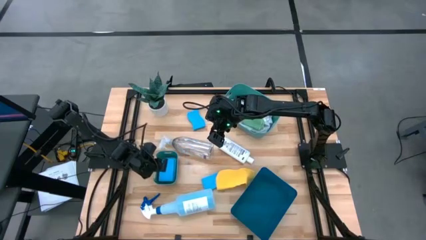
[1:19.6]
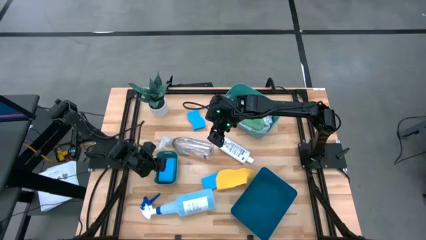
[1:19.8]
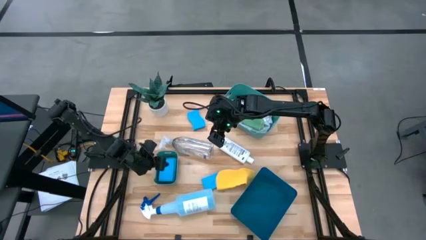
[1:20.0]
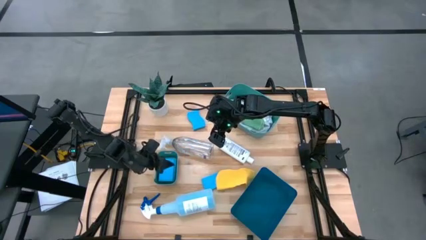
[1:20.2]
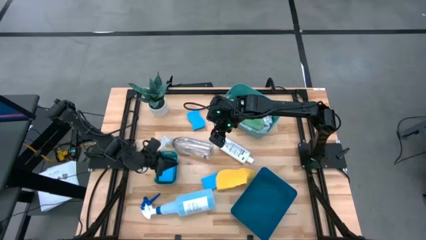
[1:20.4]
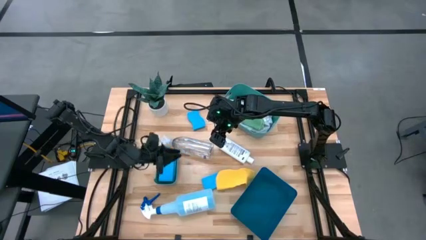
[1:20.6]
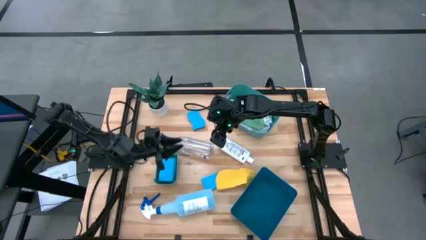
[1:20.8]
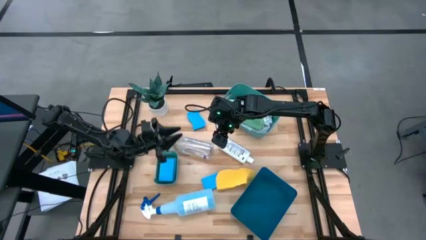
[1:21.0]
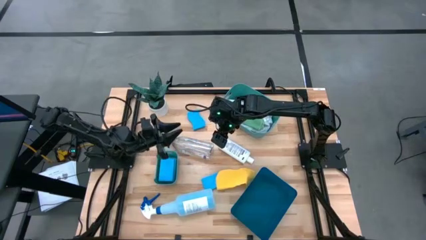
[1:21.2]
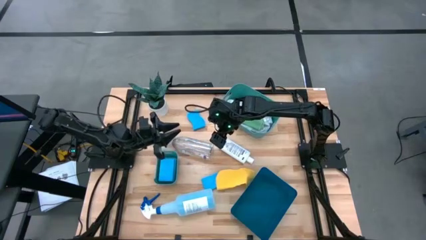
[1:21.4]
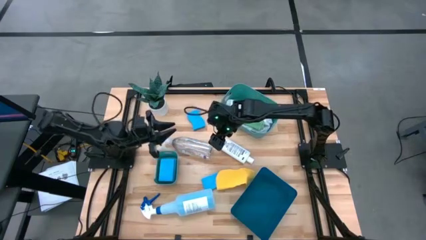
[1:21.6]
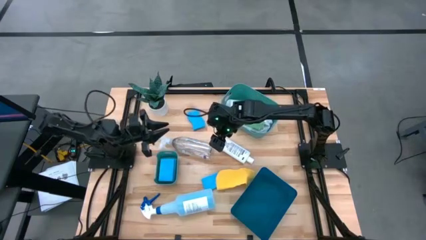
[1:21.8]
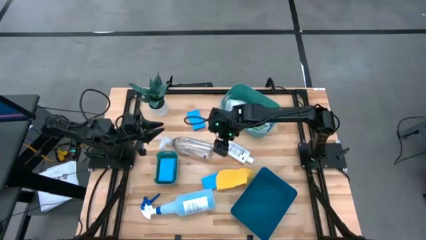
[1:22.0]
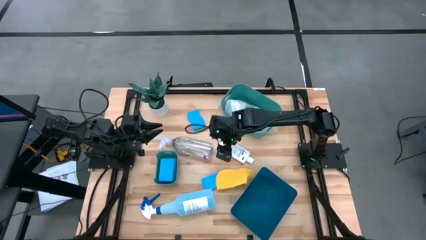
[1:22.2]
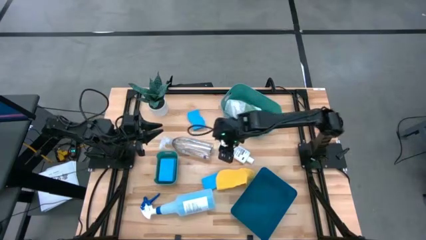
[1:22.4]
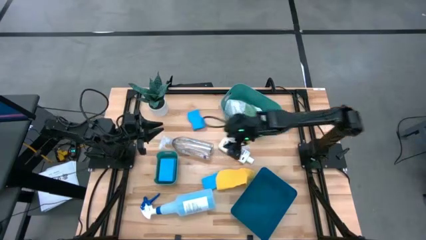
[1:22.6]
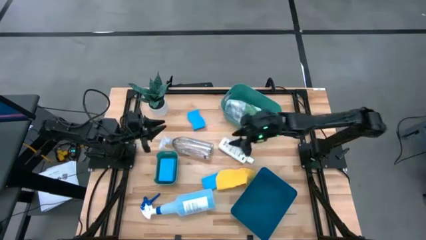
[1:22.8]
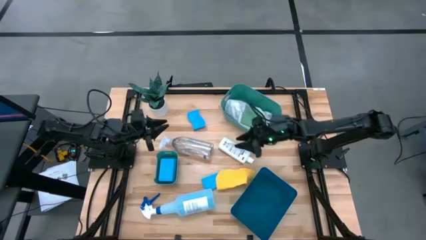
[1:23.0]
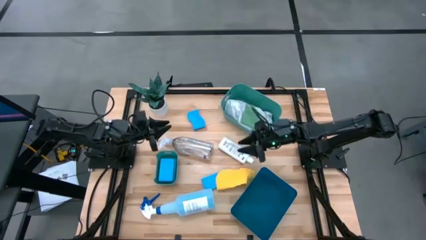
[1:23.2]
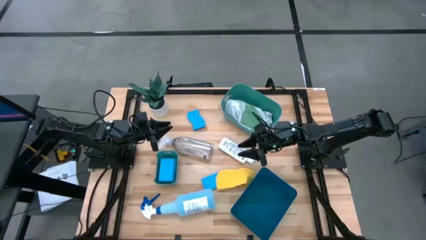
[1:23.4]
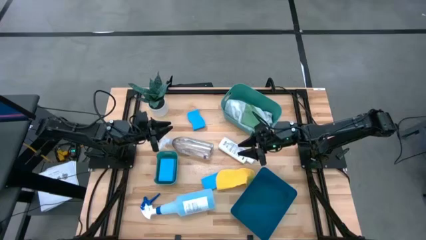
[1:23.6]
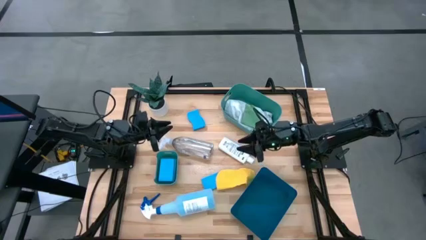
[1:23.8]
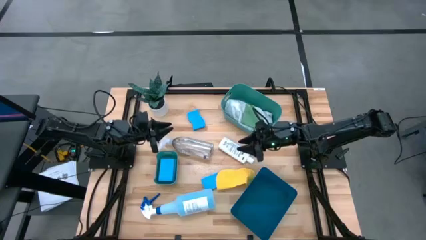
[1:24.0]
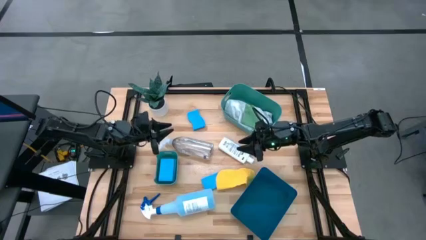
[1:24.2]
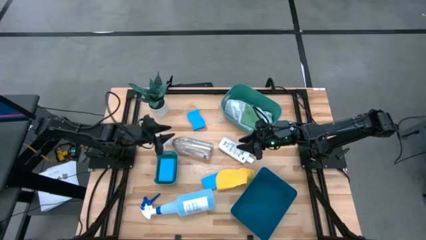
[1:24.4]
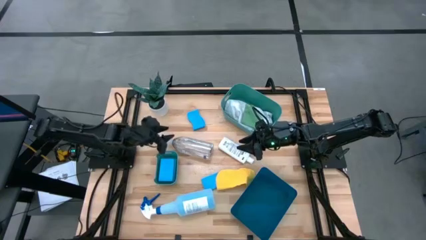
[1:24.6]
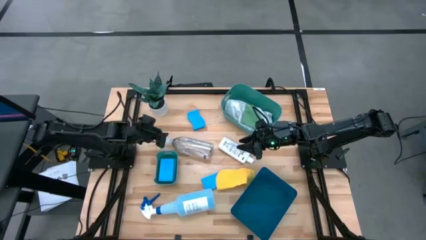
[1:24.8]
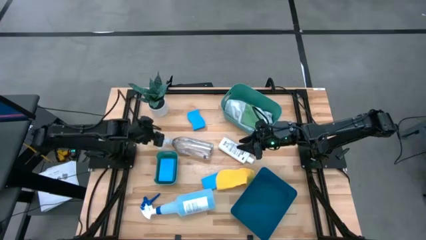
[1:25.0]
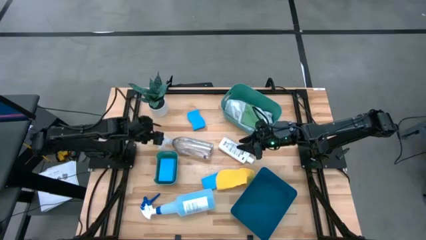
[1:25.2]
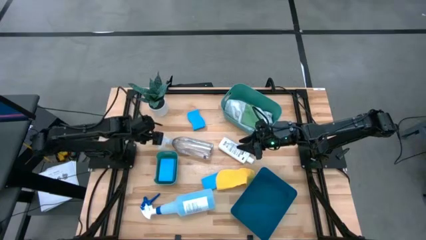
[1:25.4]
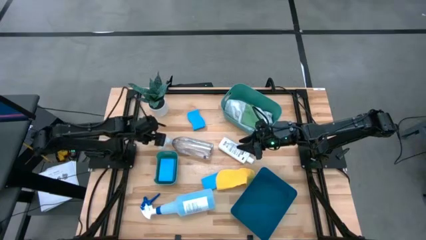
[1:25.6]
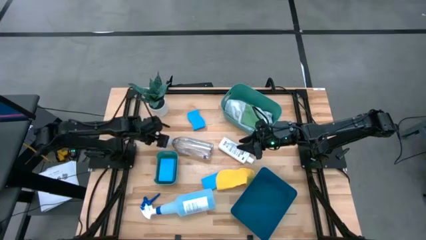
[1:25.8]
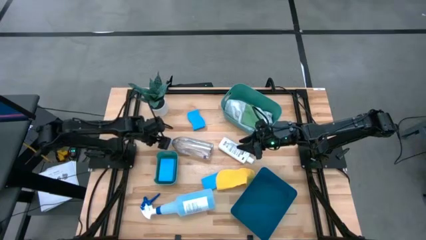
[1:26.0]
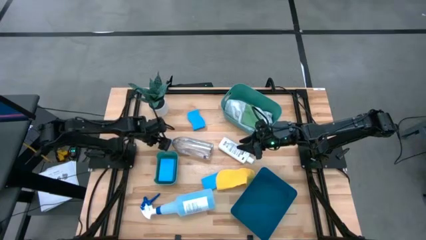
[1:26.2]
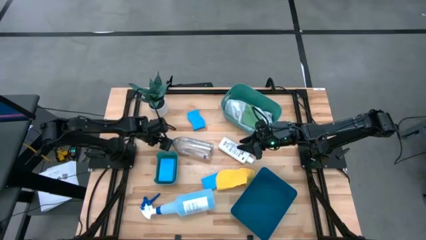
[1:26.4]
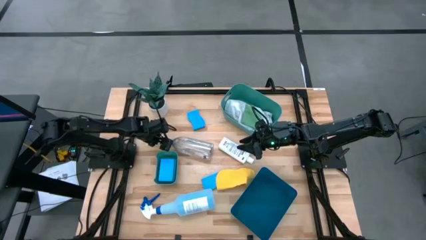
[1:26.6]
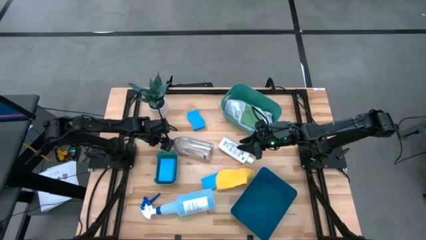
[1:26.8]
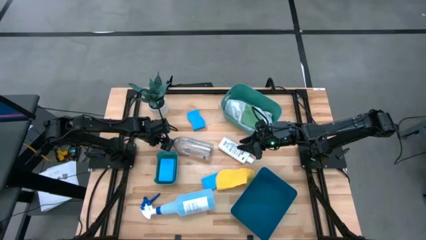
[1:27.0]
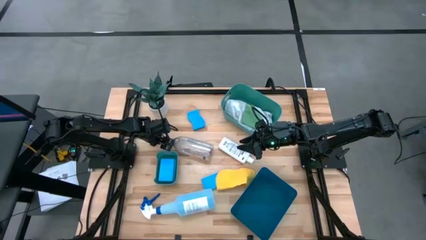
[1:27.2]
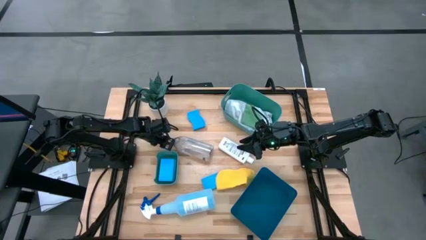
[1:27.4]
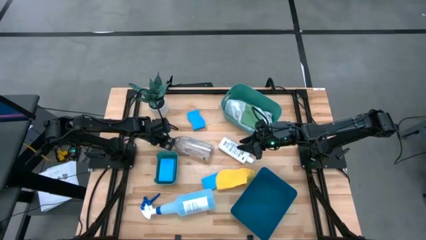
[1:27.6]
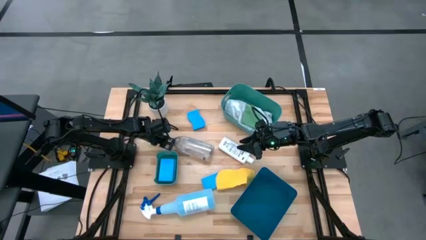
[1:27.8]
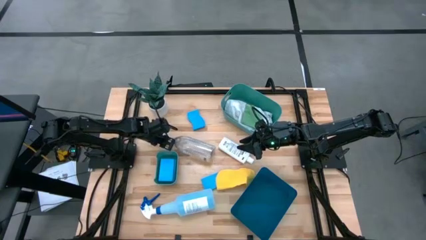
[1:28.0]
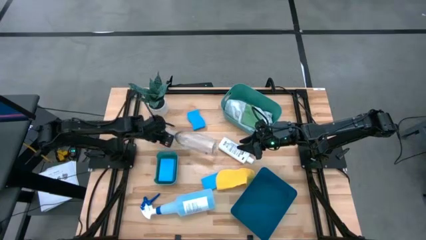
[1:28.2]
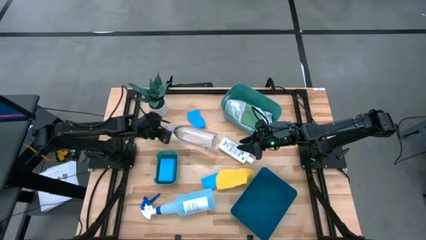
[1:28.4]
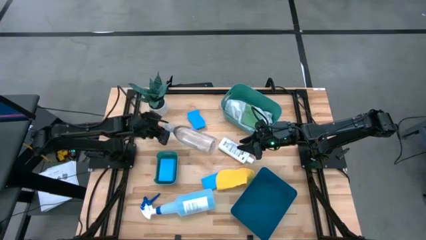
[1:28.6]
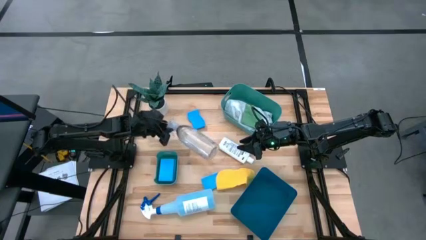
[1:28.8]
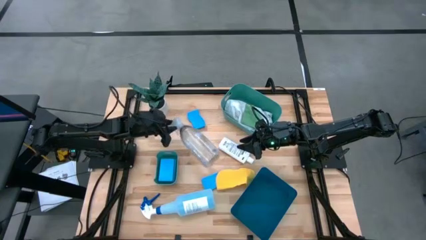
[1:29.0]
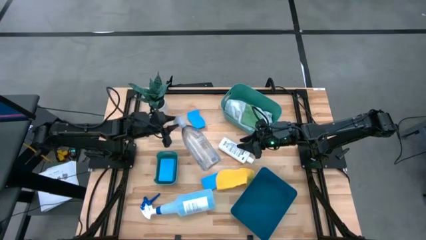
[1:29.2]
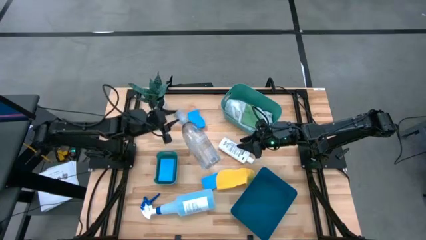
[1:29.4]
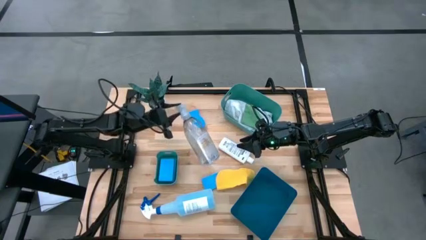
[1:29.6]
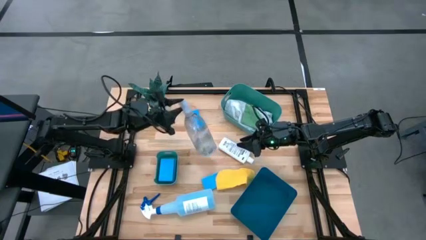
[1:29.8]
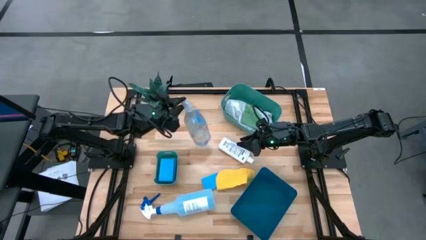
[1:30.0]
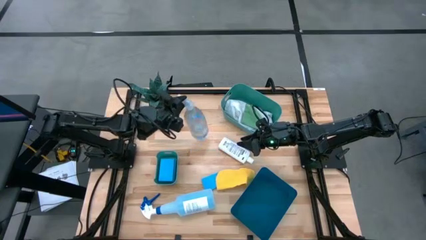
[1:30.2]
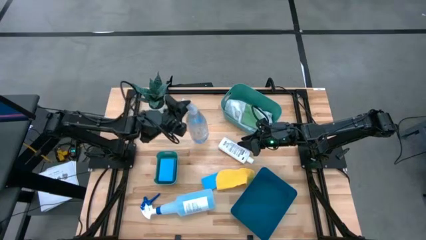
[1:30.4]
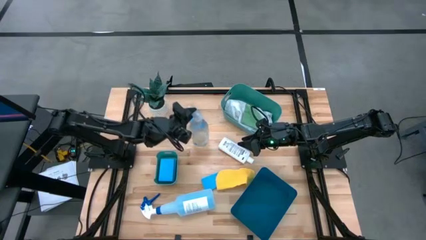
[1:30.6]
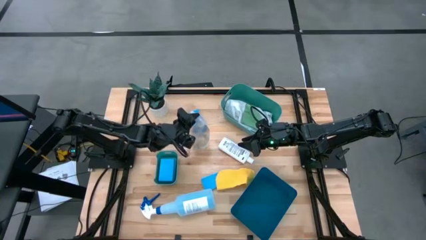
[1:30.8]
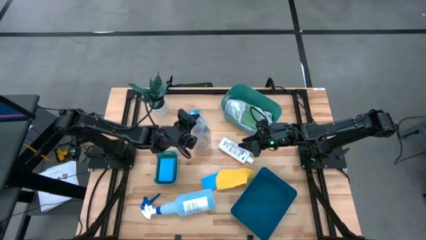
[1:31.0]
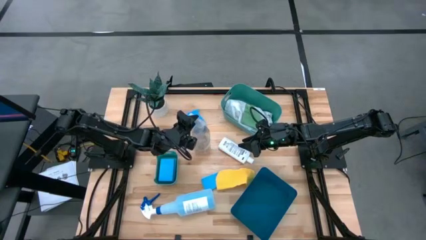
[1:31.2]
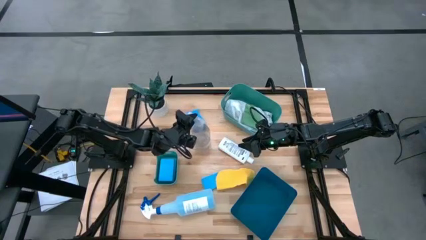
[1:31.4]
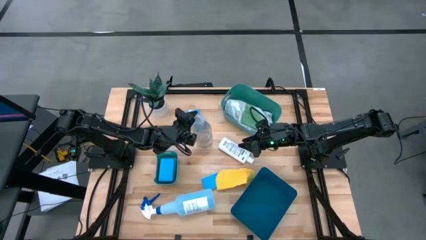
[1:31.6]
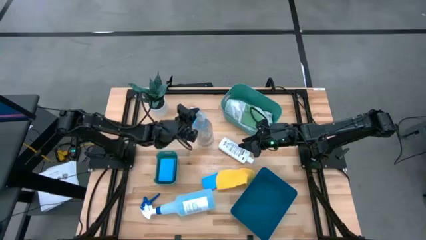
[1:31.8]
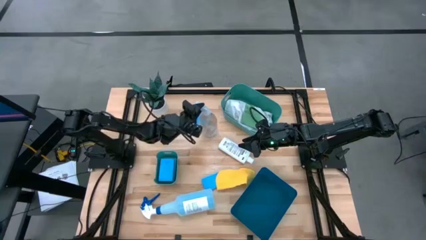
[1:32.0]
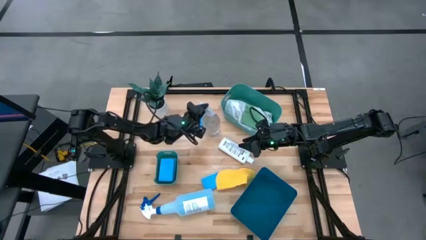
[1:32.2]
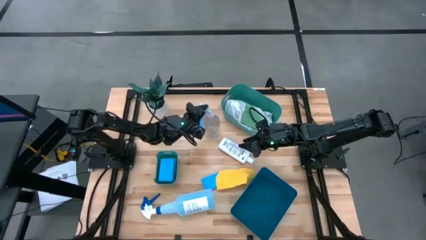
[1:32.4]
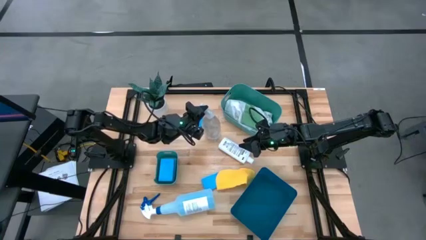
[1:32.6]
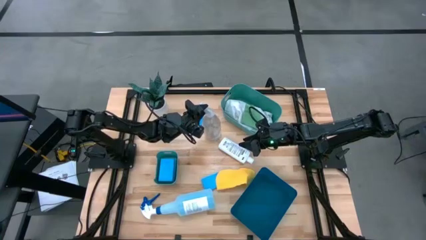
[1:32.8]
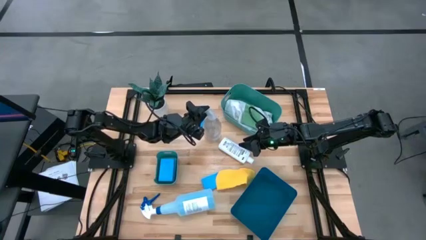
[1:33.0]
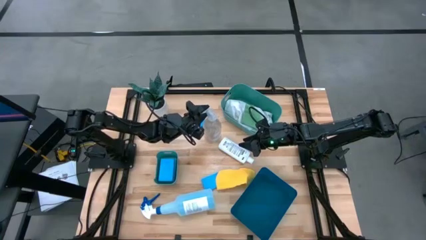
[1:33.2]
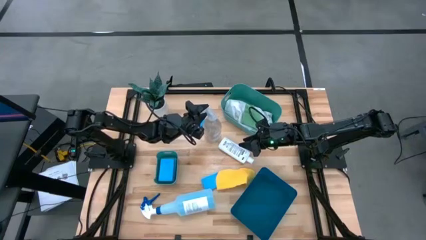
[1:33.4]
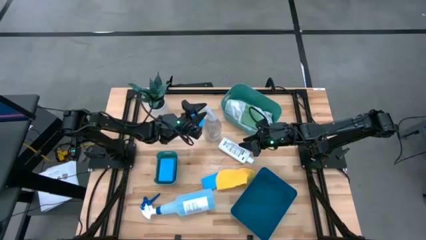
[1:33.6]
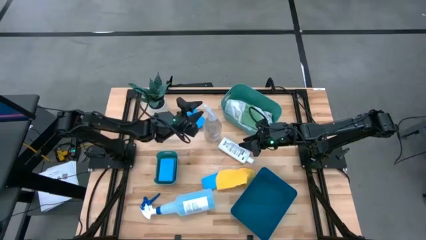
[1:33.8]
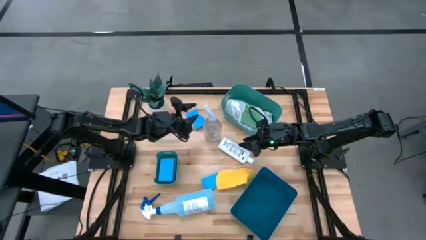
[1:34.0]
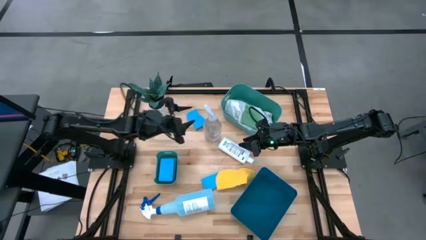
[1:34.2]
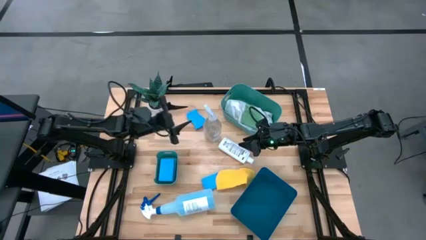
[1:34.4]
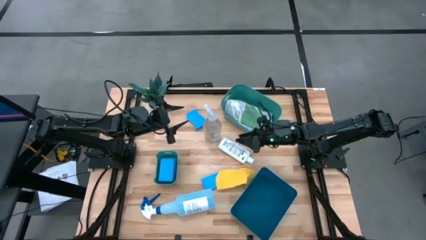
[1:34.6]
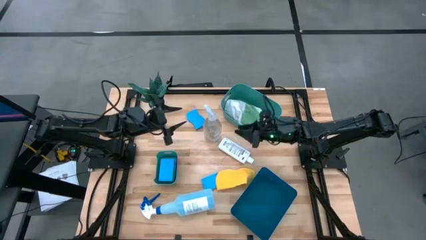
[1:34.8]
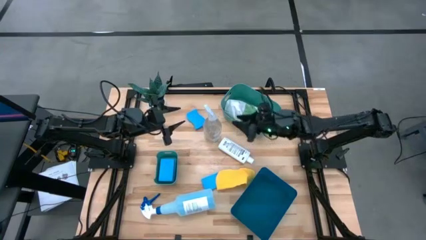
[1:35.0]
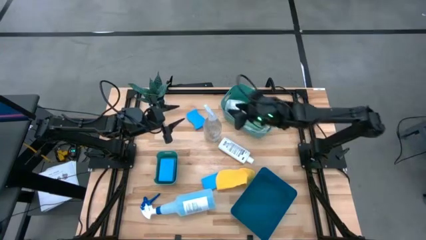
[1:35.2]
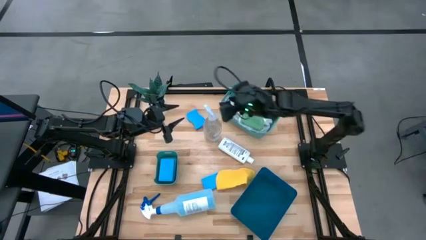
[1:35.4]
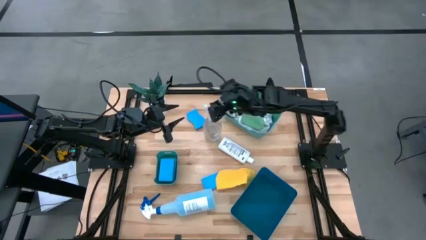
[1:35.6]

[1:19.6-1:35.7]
Task: Pick & Place Kitchen Items
Put the transparent spray bottle into the blue bin
